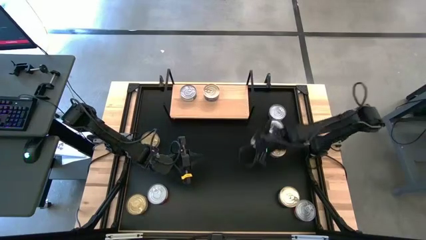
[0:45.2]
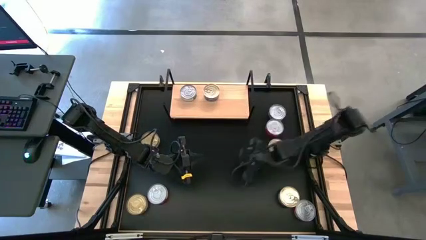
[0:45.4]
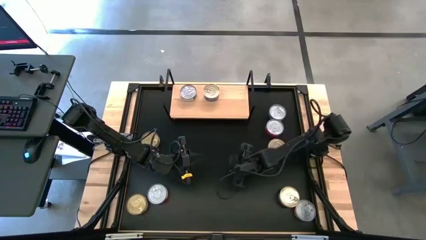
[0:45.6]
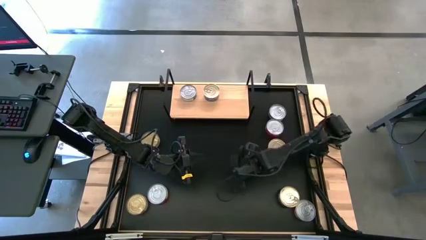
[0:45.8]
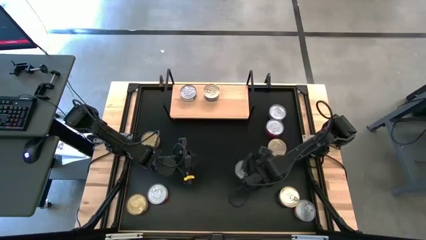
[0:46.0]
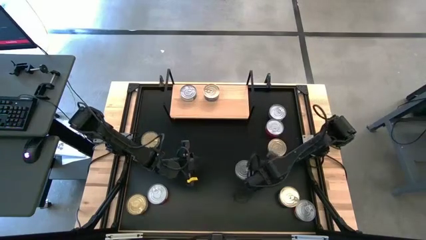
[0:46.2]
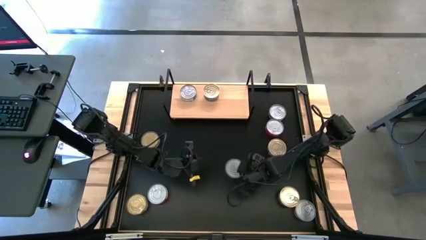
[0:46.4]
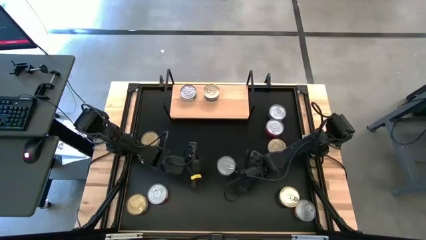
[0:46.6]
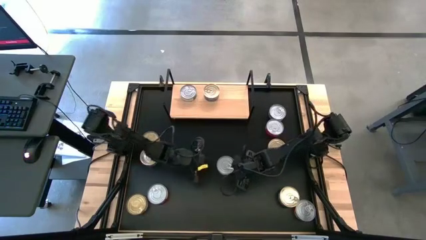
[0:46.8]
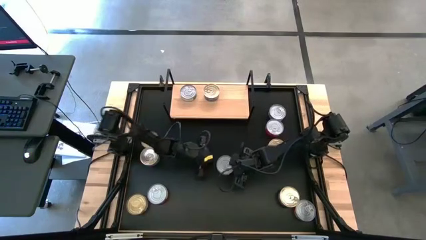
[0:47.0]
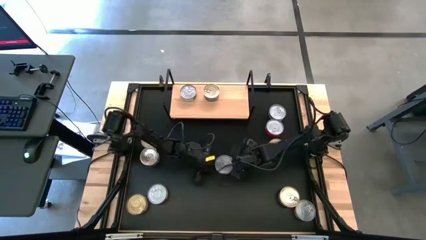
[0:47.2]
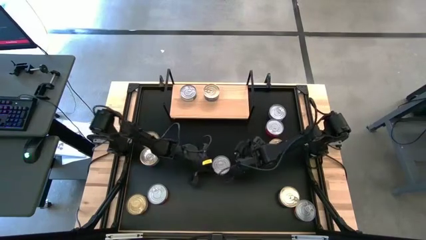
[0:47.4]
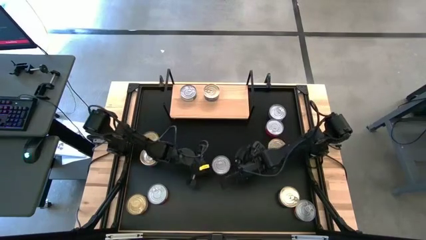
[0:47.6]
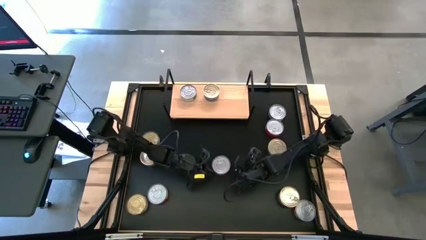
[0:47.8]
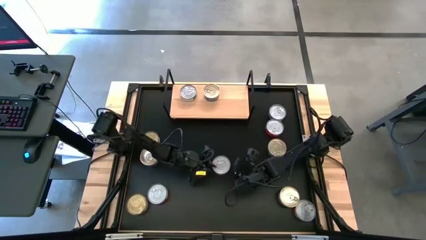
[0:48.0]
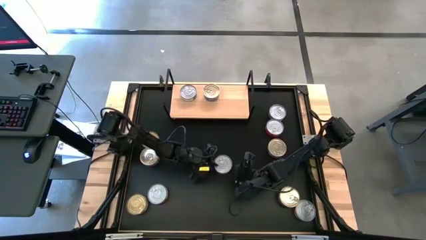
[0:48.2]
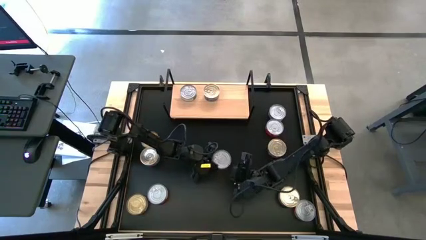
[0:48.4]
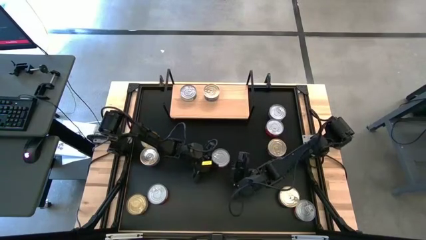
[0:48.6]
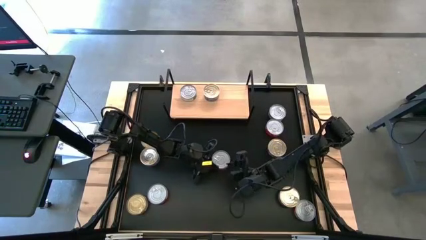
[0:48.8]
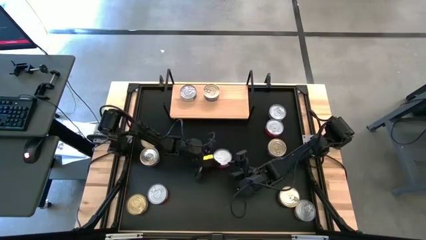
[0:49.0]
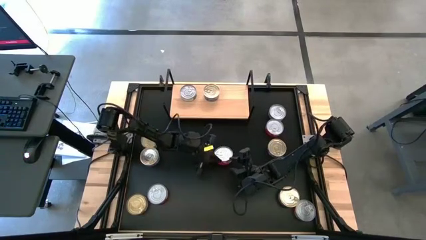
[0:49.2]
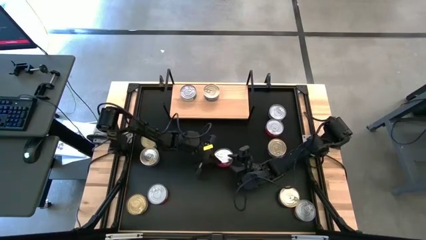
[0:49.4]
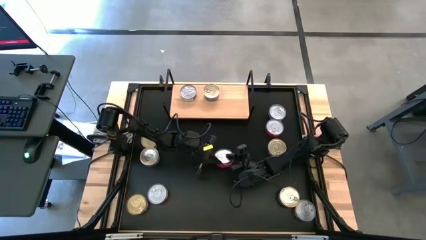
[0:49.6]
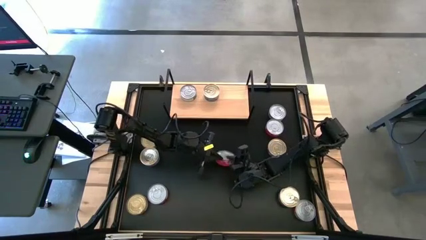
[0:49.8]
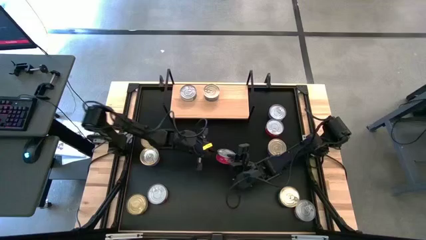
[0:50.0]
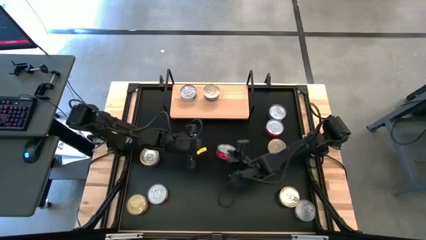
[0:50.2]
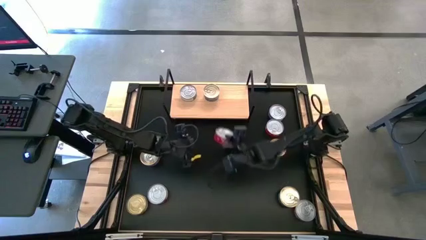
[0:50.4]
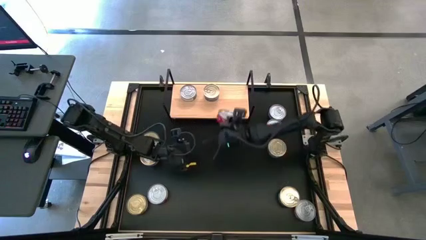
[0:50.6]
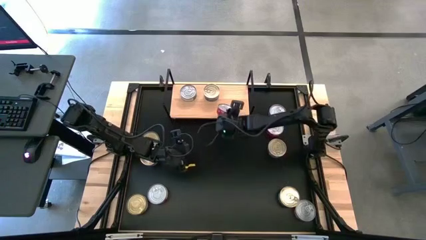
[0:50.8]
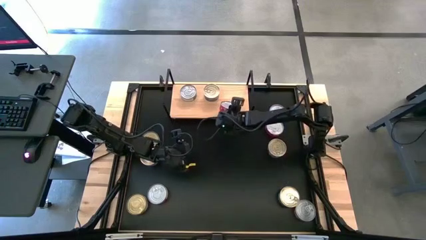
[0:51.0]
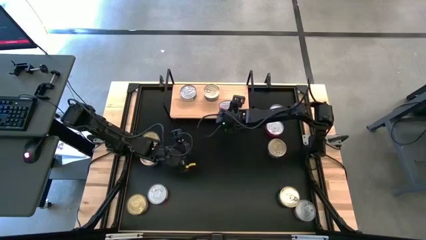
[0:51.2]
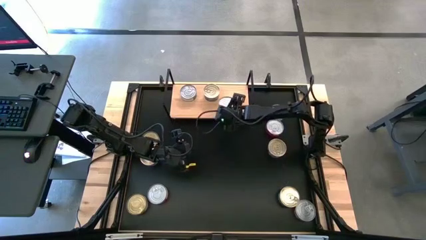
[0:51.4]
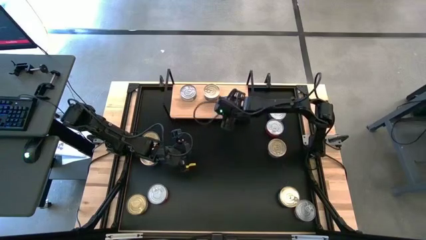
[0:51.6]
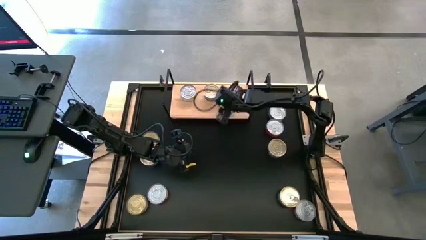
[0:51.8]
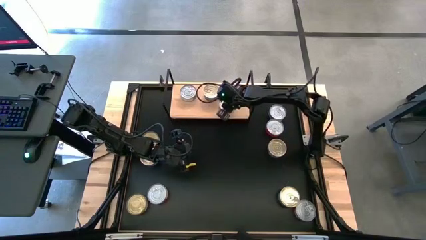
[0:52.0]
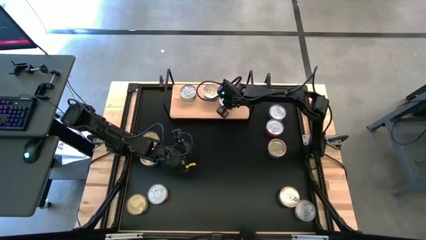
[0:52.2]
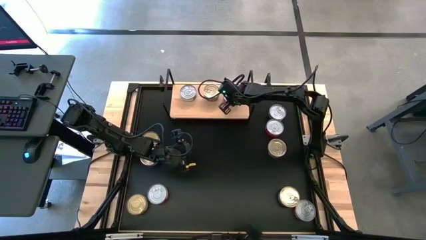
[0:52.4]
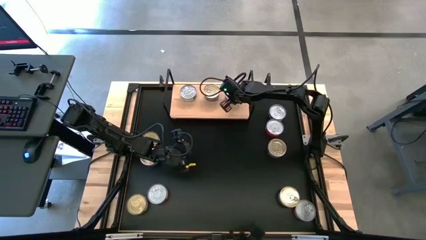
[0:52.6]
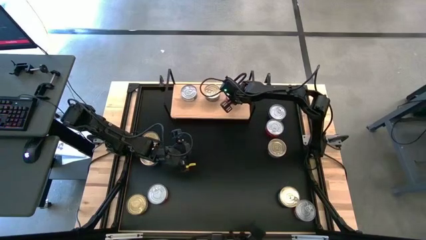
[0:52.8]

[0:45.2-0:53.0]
Task: Stack canned seafood by type on shelf
Put the red tuna can on the shelf

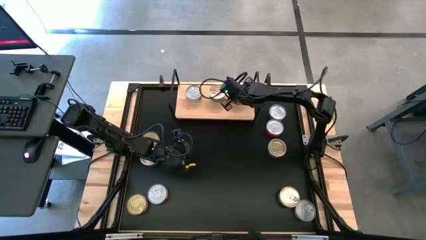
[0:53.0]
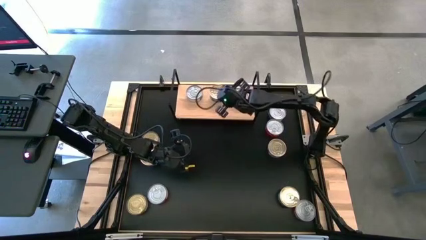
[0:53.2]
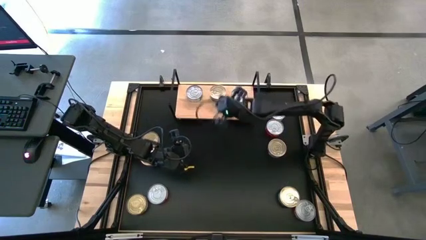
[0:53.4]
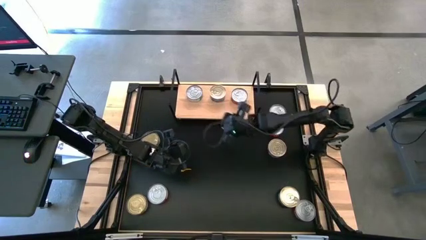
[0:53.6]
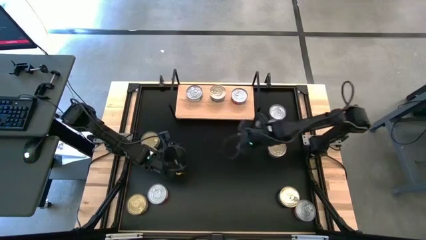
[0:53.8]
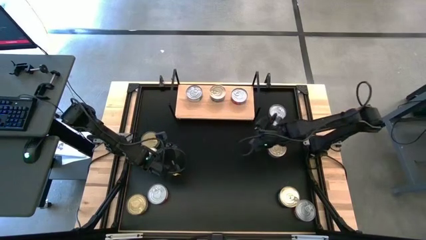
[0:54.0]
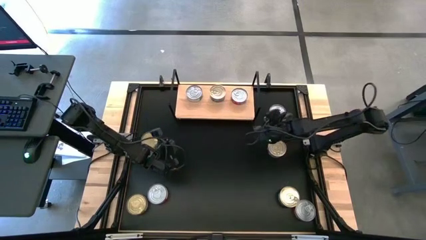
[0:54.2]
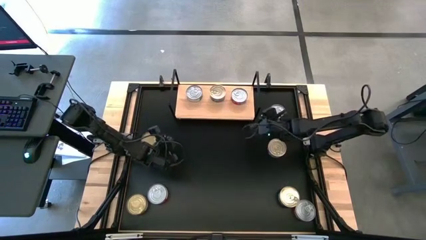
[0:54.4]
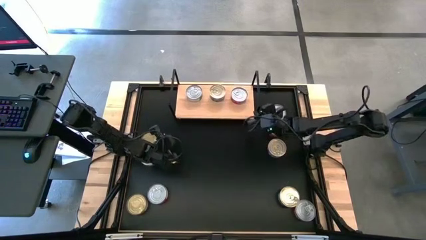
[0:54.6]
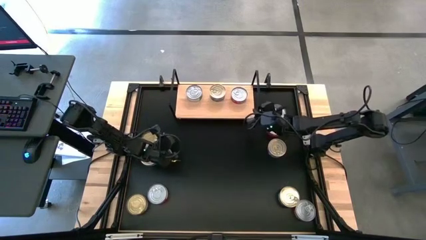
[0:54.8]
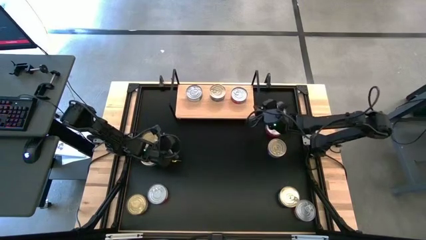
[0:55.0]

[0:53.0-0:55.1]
Adjust the shelf on the table

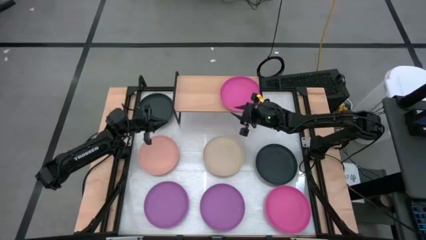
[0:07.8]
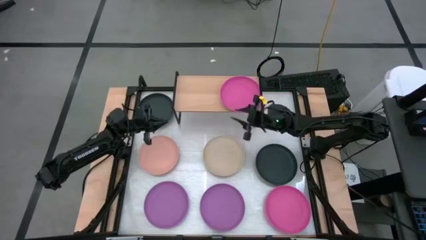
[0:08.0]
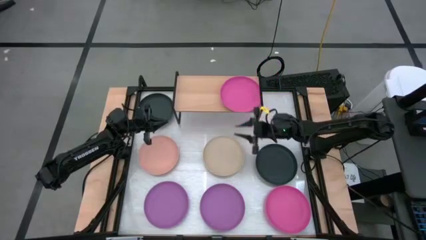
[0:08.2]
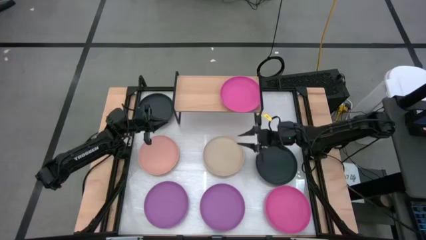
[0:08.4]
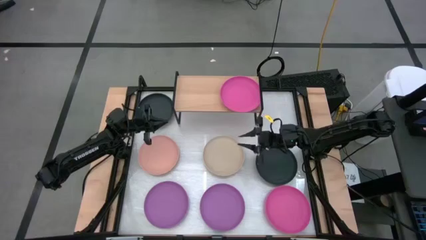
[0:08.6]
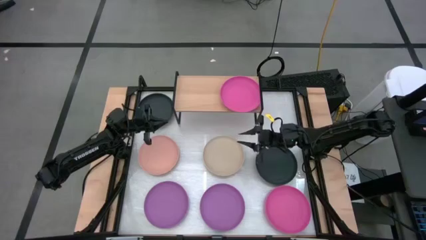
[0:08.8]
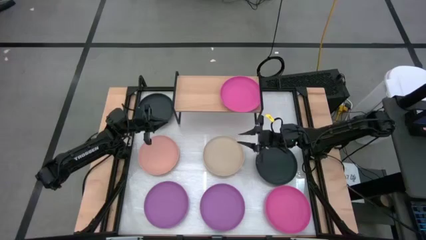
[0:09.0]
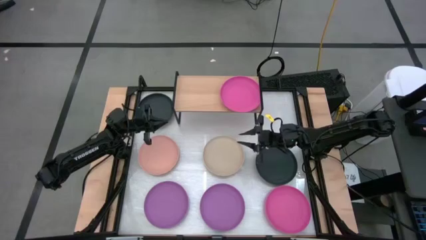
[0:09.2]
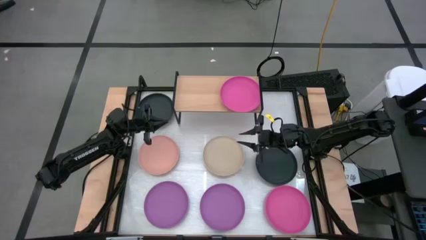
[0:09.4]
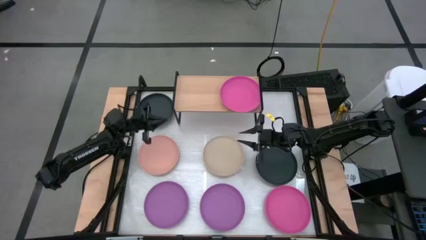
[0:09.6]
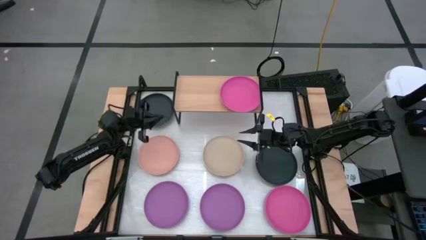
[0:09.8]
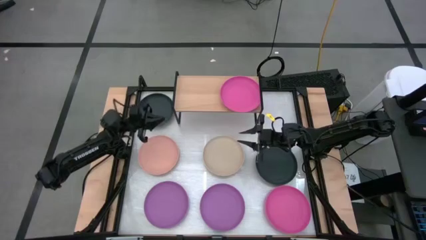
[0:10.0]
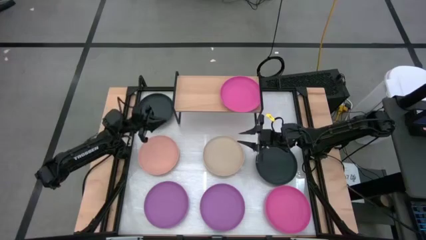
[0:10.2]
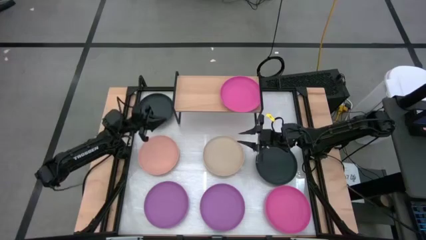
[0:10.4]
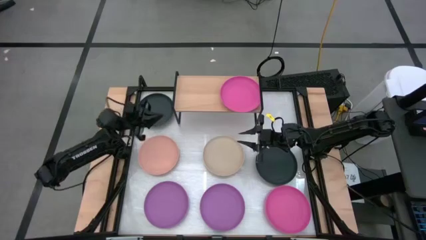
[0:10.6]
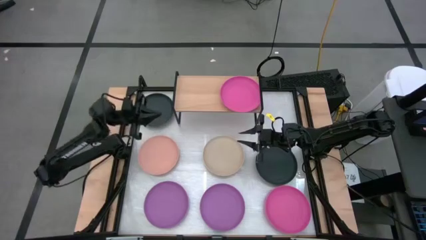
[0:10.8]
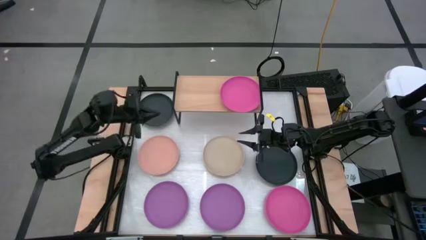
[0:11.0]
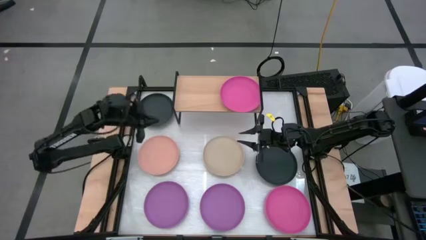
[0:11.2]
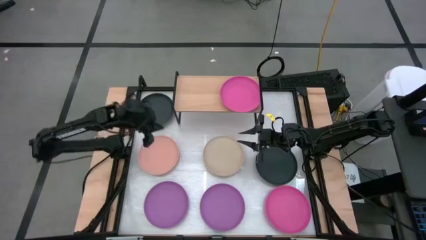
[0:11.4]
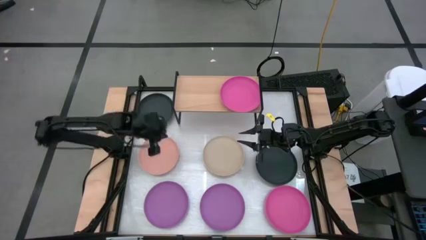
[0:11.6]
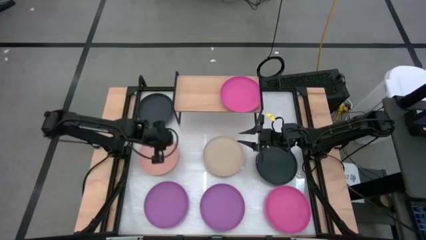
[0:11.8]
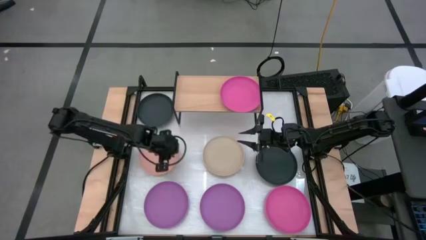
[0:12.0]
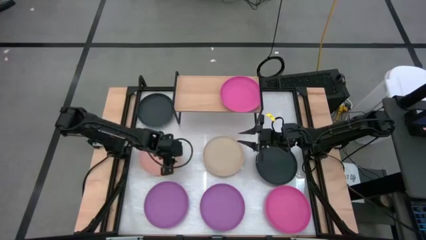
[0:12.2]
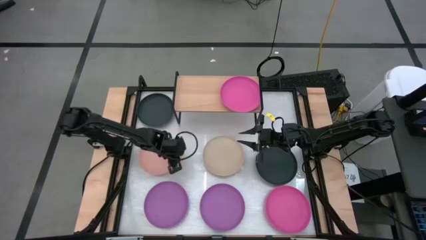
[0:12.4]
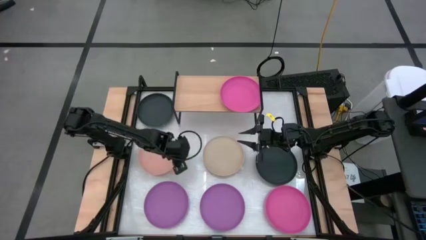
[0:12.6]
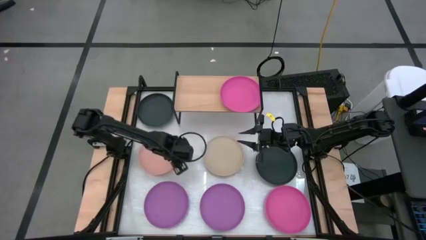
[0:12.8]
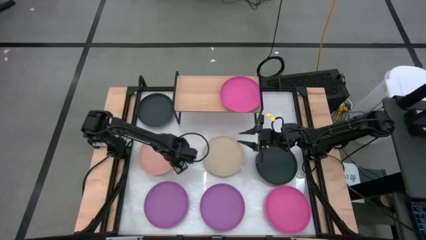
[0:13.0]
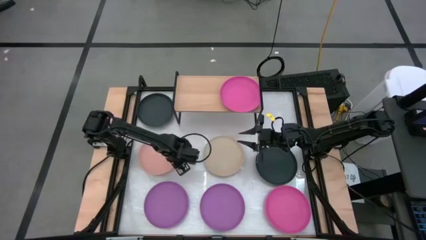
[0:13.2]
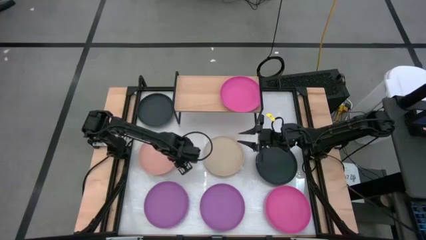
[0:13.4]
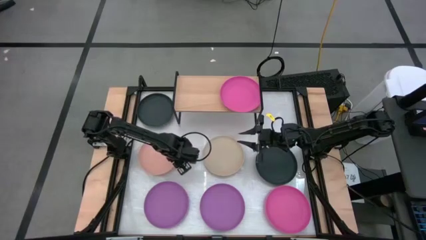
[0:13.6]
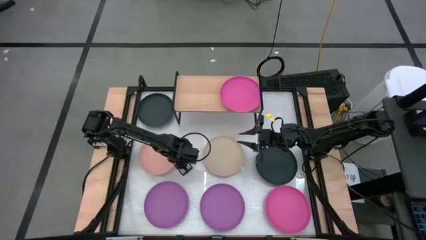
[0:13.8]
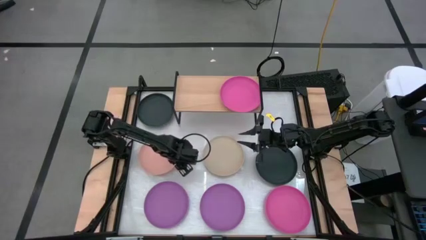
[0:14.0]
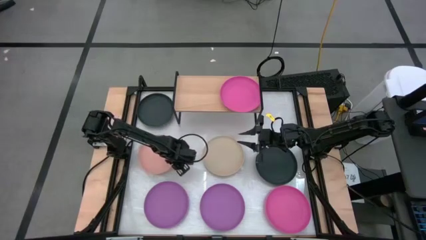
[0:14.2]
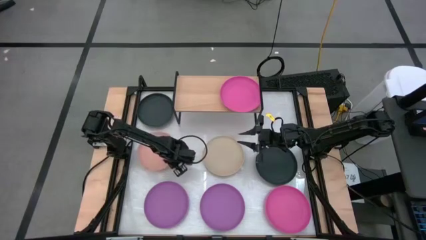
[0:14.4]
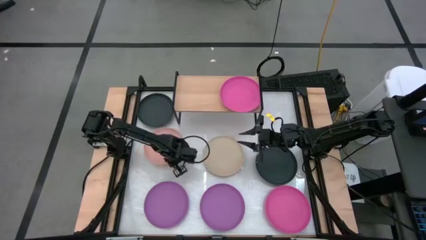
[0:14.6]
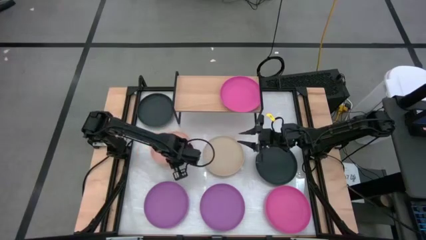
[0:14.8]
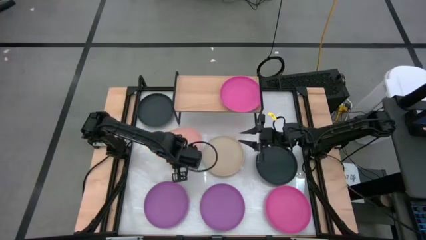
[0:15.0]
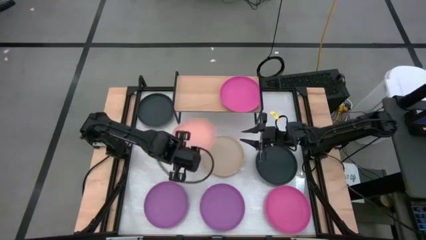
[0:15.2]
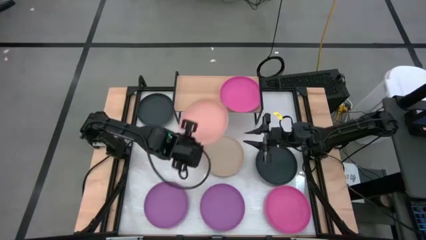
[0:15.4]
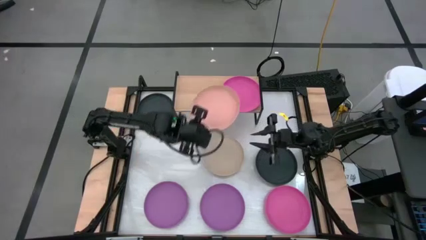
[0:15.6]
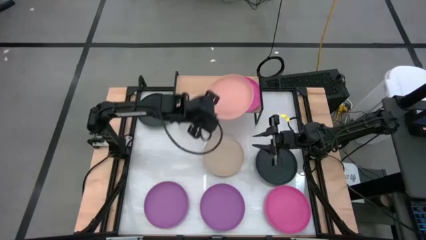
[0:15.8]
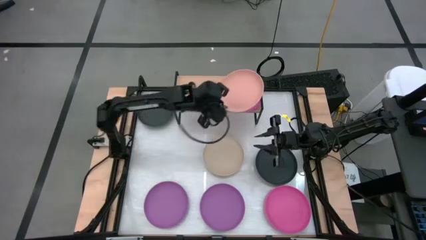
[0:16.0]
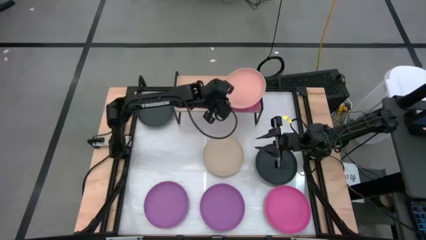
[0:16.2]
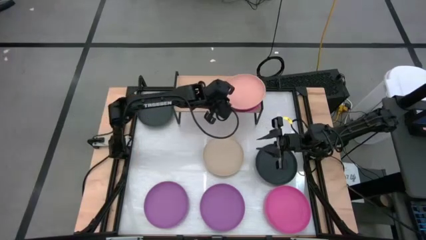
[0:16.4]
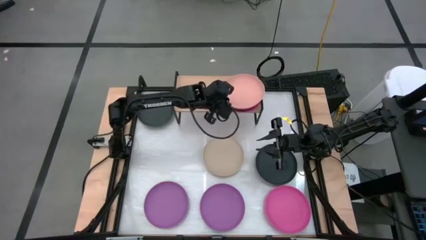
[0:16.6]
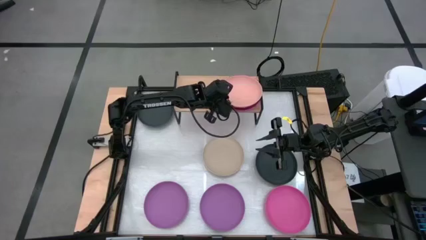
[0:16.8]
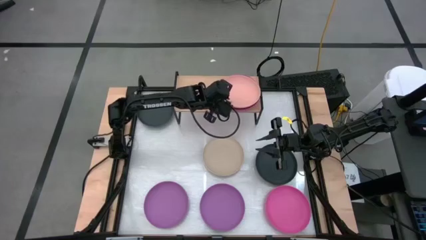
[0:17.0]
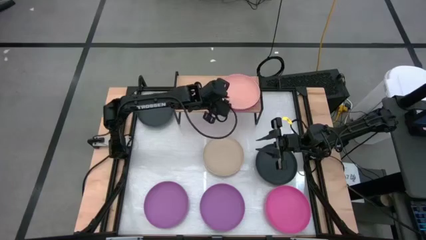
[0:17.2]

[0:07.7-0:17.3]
Task: Place and stack plates onto a shelf
Stack the light pink plate on top of the pink plate on the shelf
